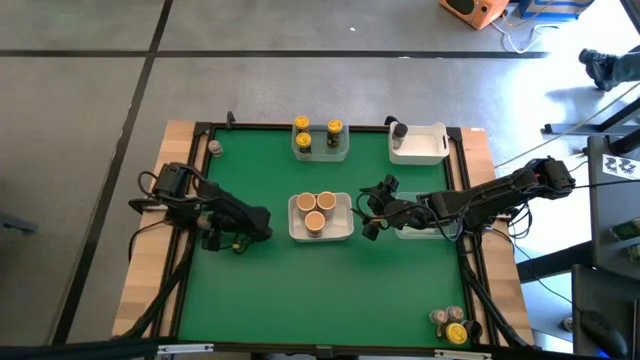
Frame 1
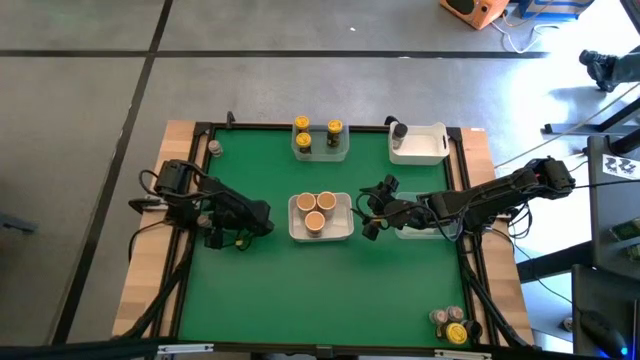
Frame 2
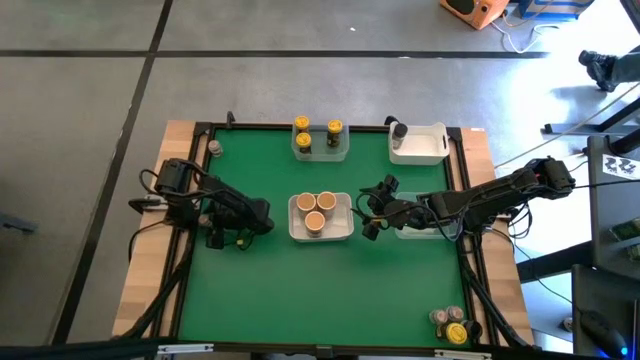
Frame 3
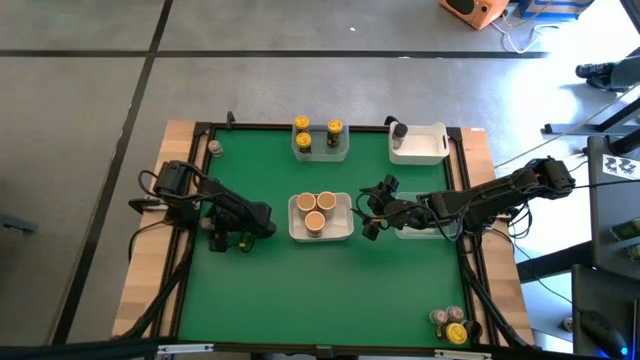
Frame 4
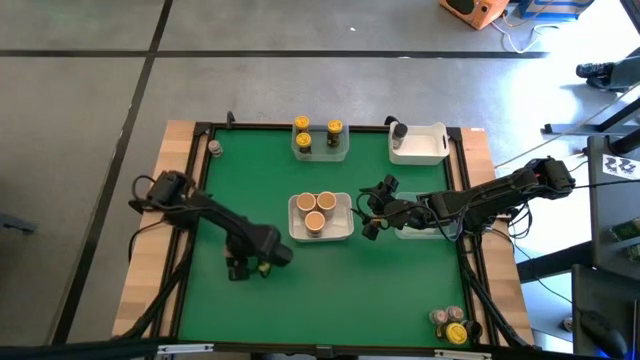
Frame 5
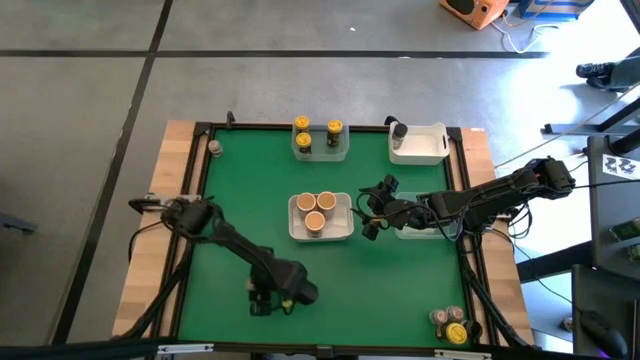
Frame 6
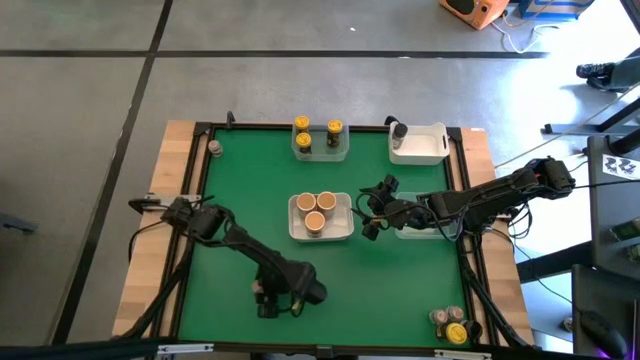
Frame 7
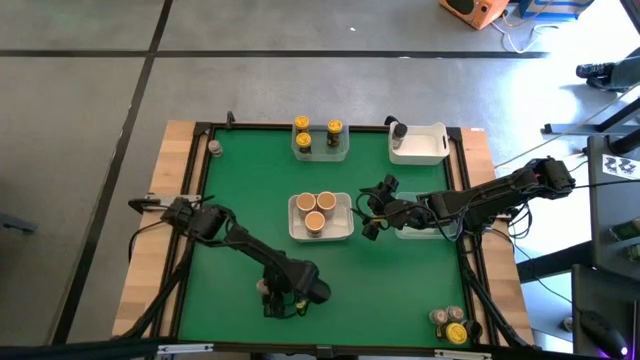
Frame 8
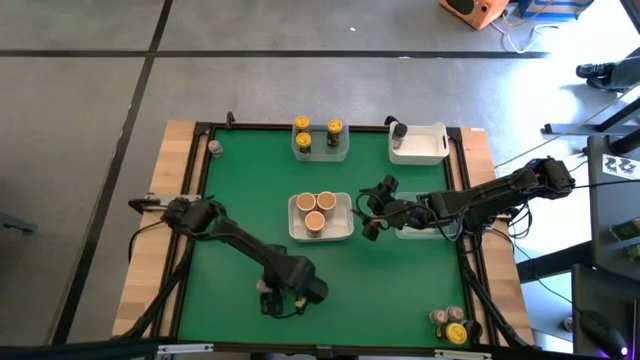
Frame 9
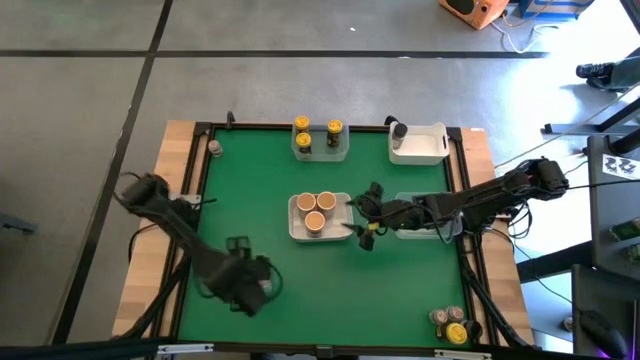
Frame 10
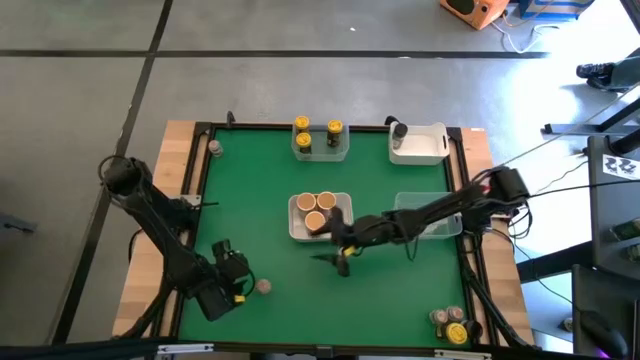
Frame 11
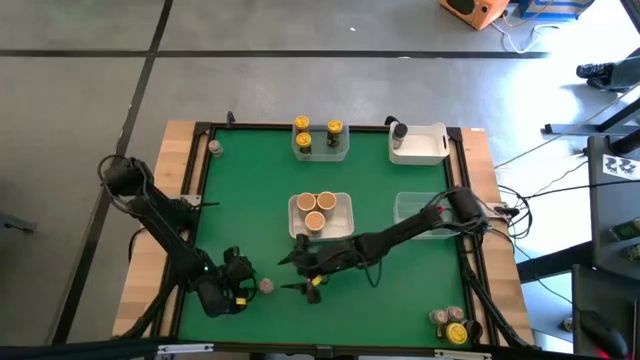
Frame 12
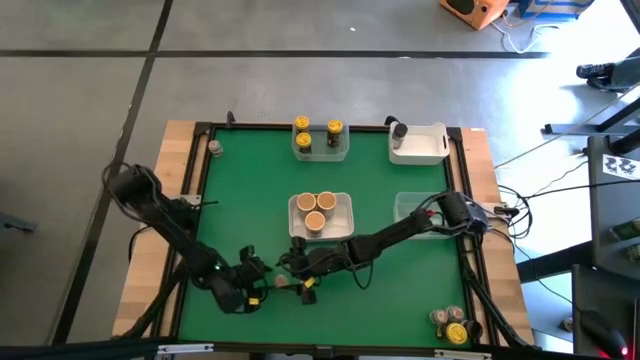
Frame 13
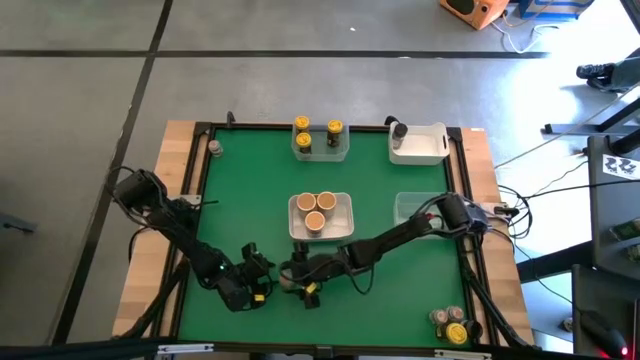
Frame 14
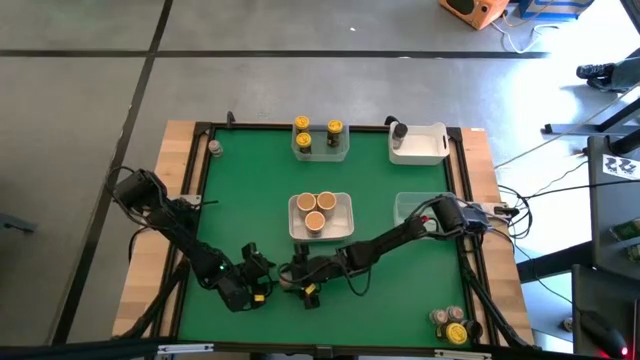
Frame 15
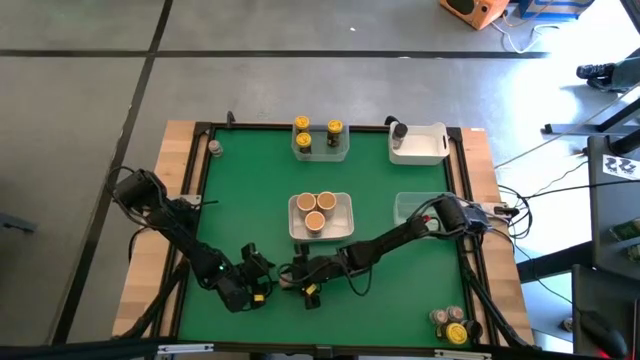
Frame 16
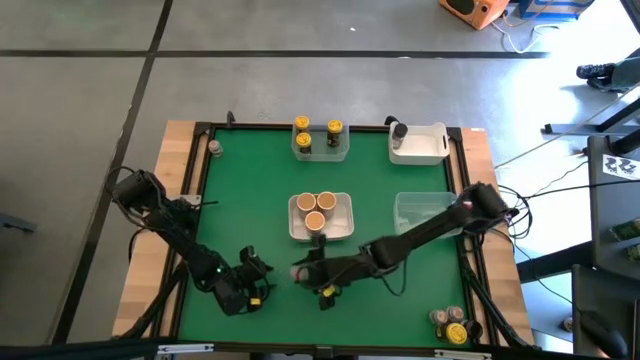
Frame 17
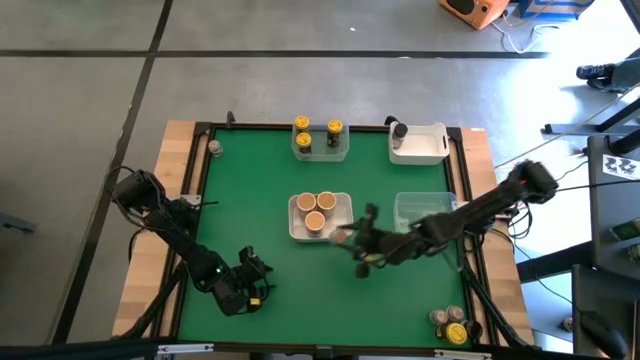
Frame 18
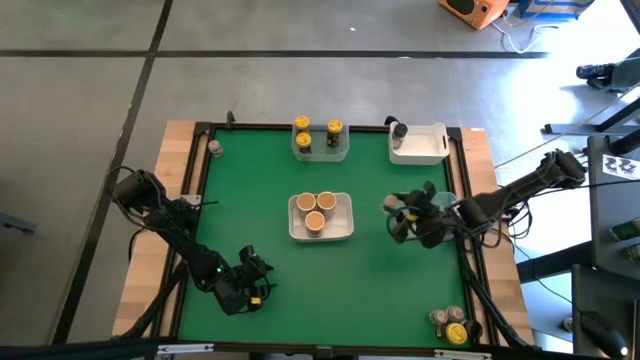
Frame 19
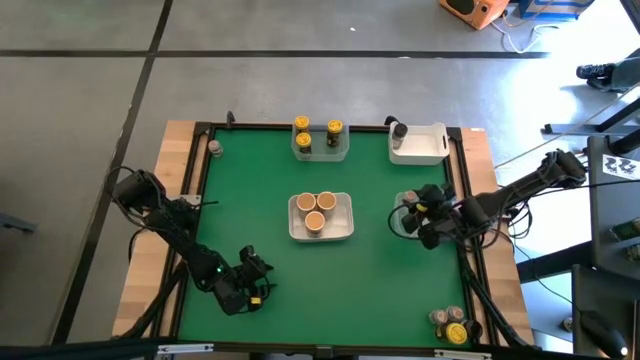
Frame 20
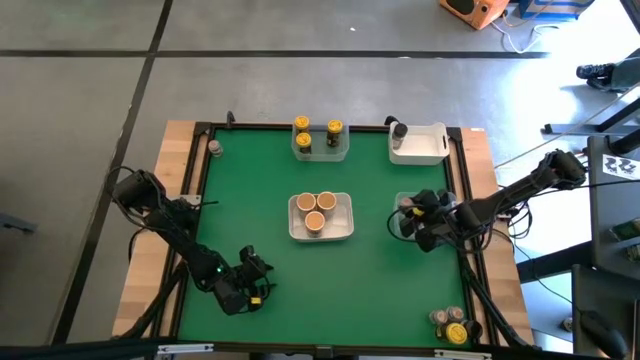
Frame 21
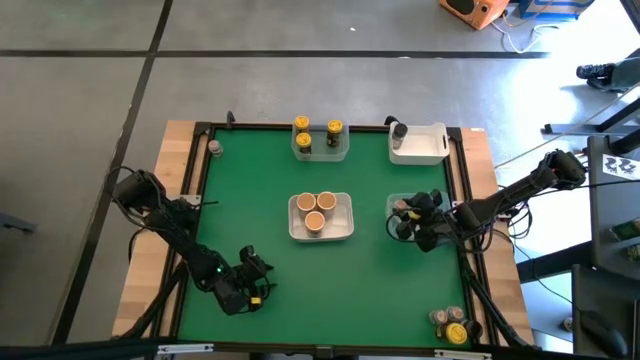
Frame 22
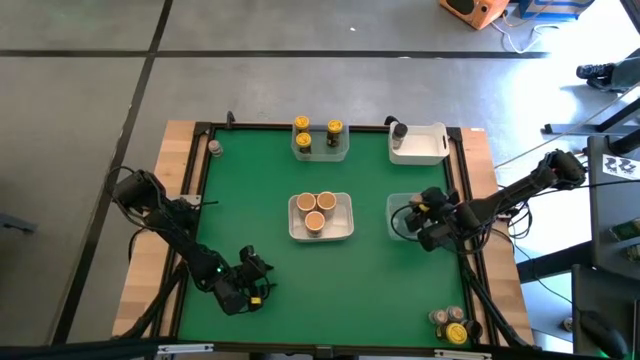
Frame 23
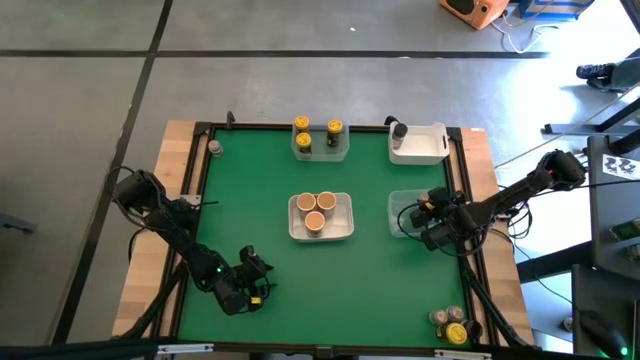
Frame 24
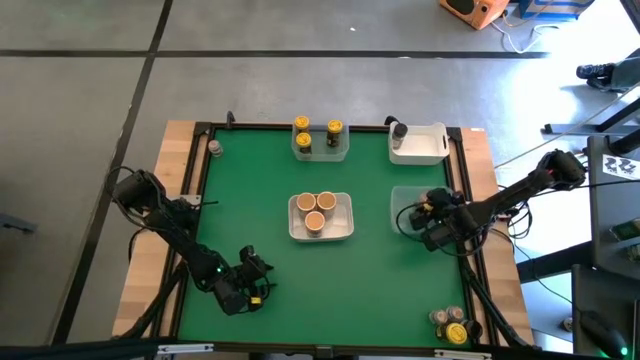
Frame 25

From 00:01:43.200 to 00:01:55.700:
Task: Sort spices by type
Put the middle brown seasoning bottle into the bottom transparent bin

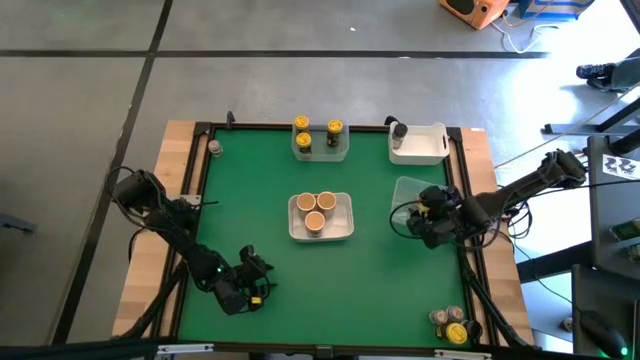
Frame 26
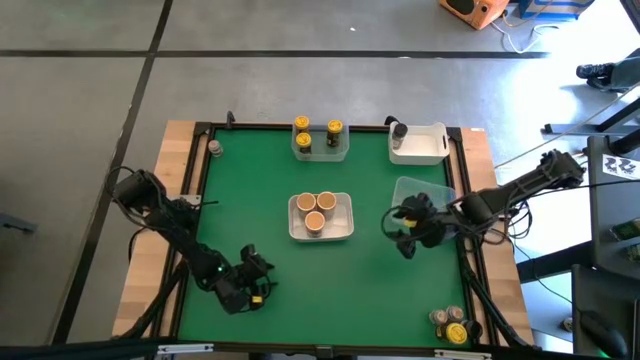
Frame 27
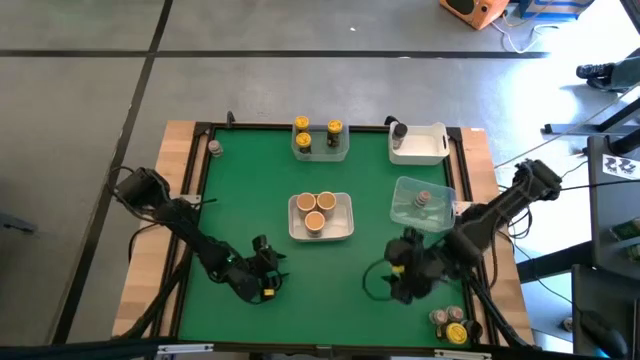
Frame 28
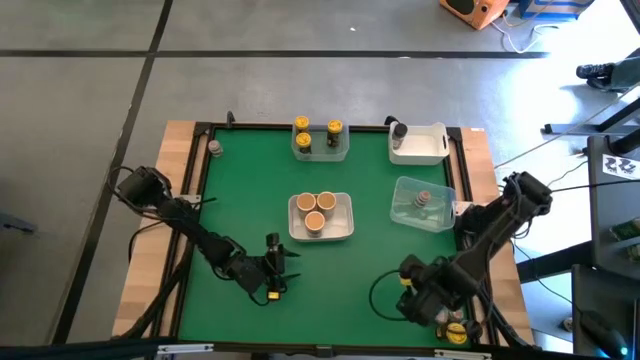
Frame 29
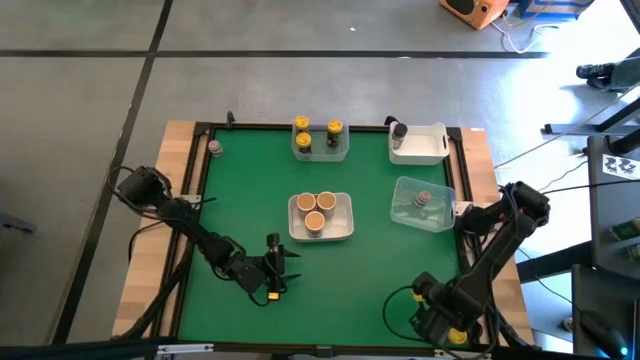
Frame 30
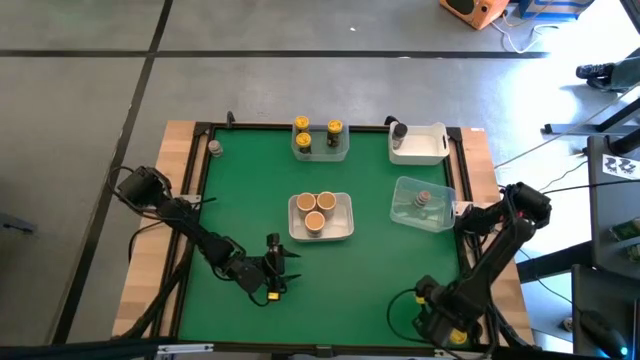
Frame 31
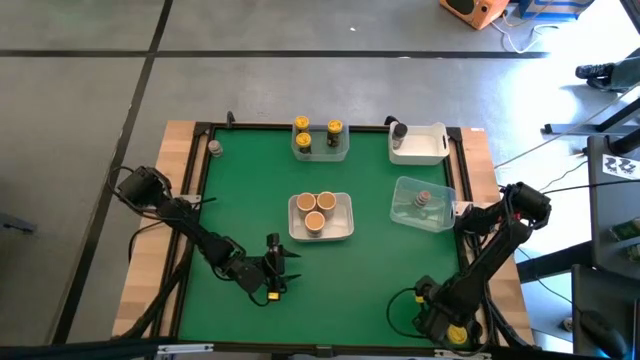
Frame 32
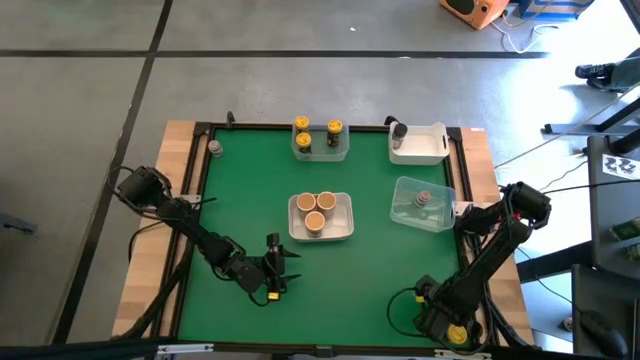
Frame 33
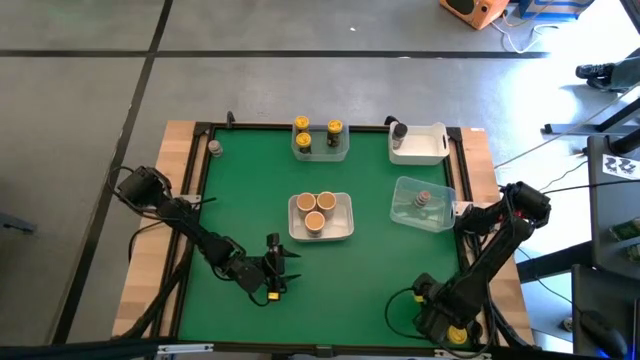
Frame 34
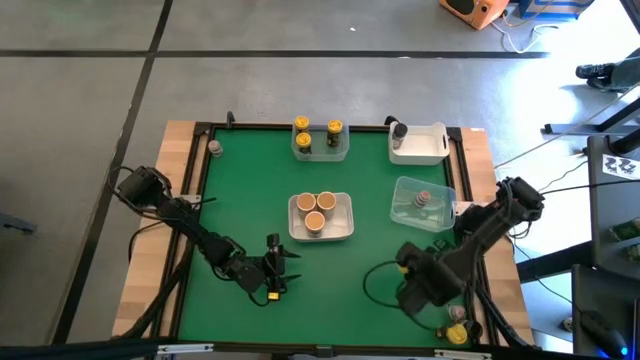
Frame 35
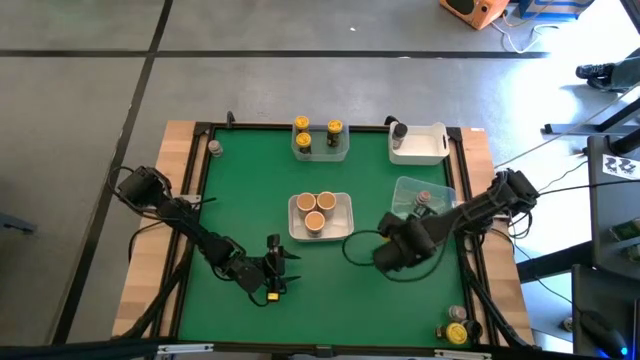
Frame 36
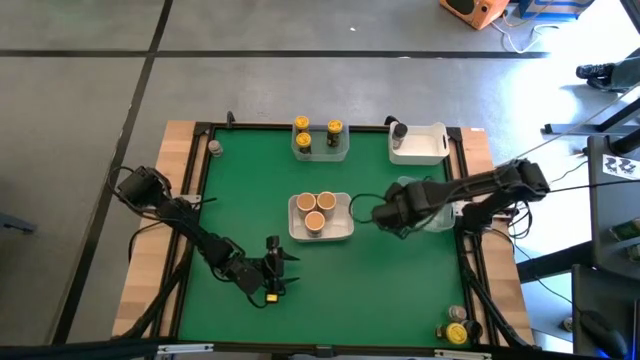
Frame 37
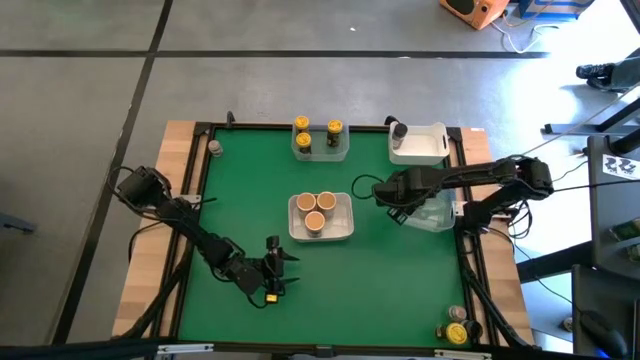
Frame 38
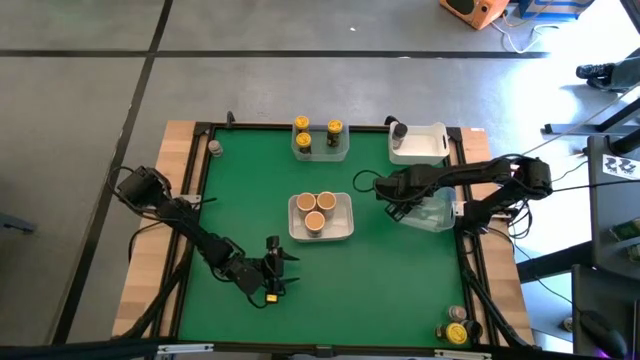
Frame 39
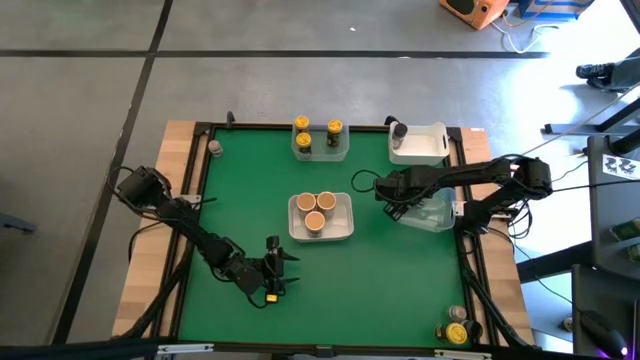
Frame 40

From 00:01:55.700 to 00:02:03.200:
Put the bottom left brown seasoning bottle into the bottom transparent bin
